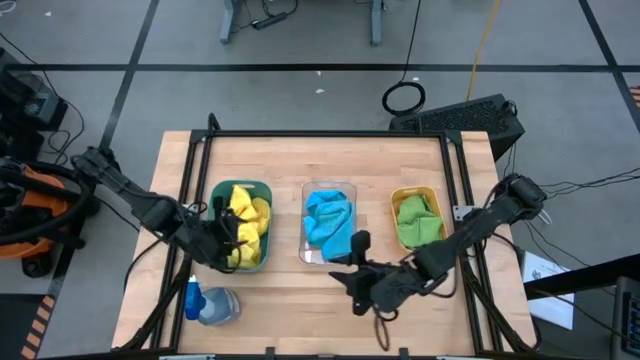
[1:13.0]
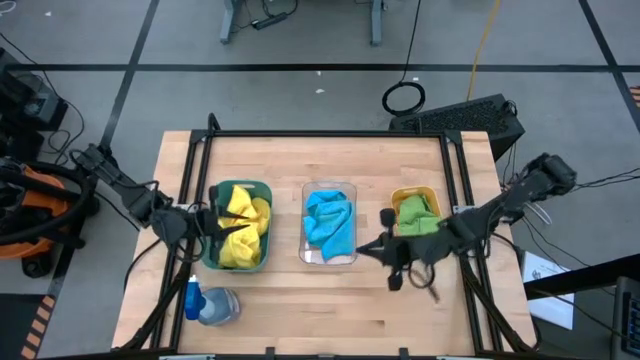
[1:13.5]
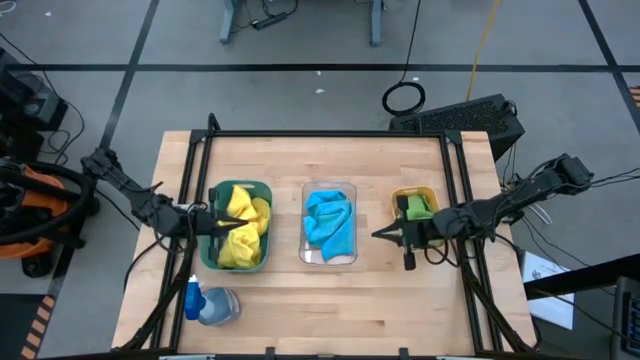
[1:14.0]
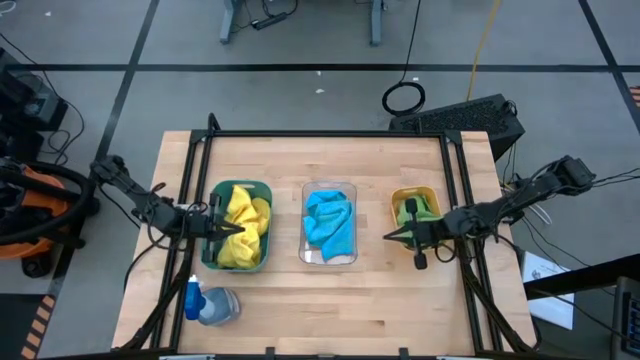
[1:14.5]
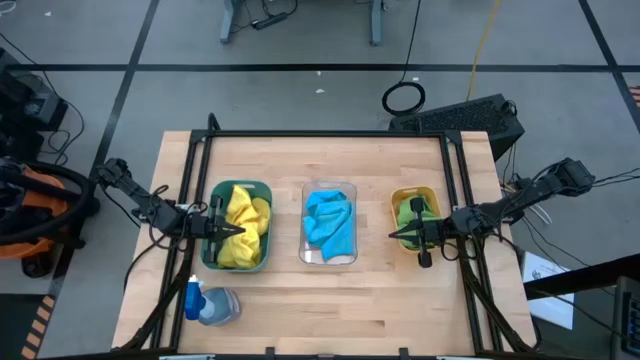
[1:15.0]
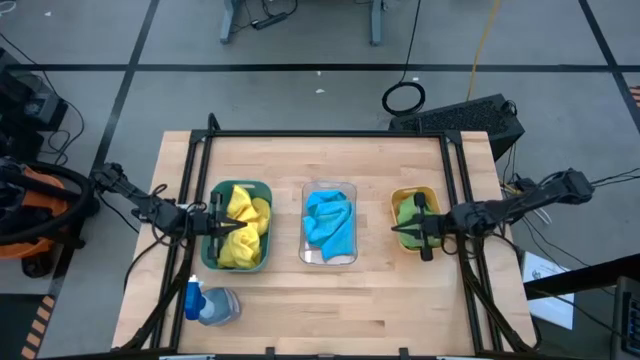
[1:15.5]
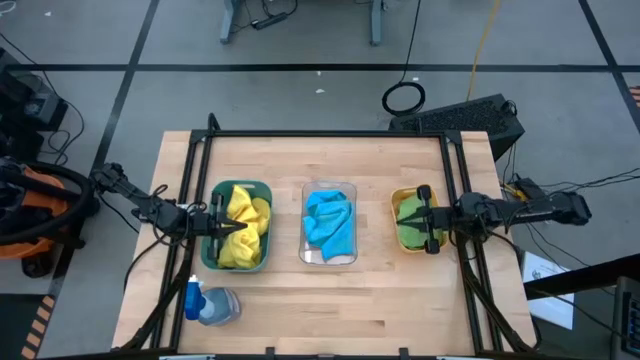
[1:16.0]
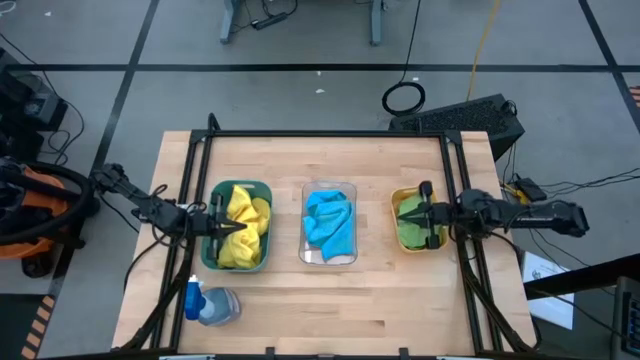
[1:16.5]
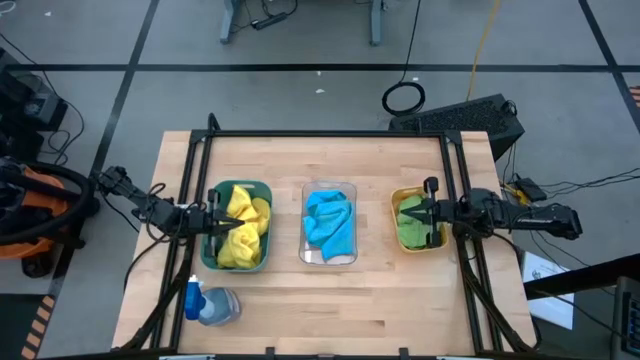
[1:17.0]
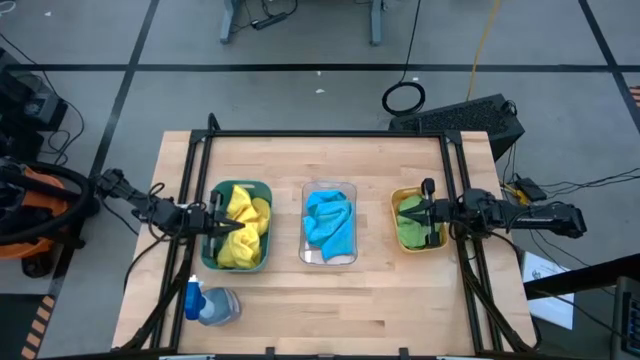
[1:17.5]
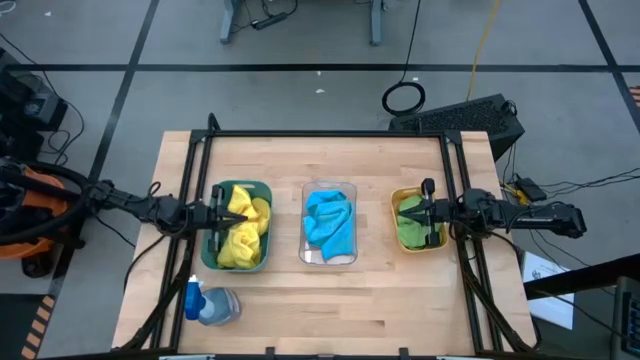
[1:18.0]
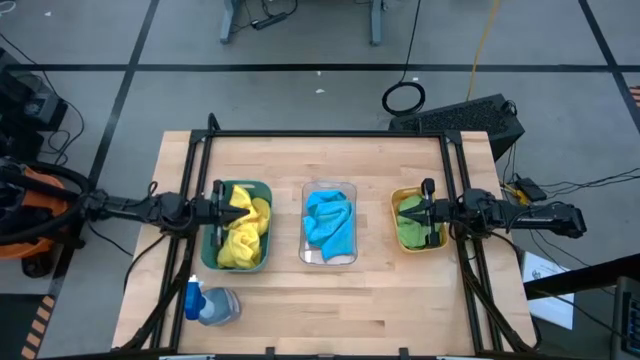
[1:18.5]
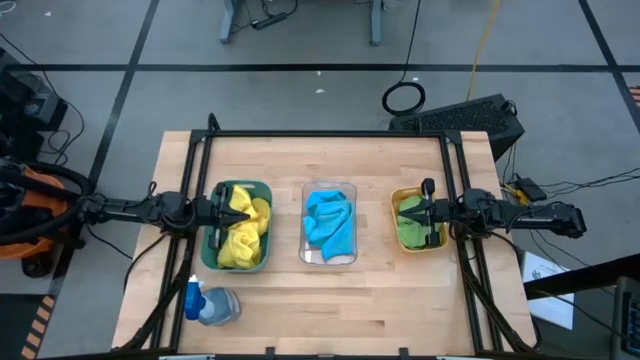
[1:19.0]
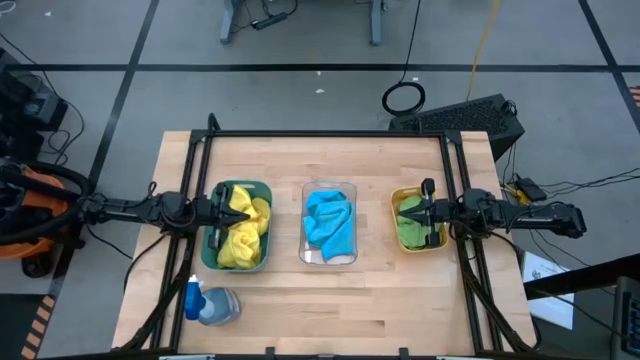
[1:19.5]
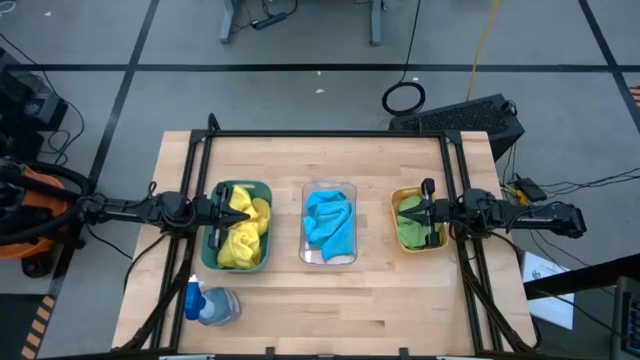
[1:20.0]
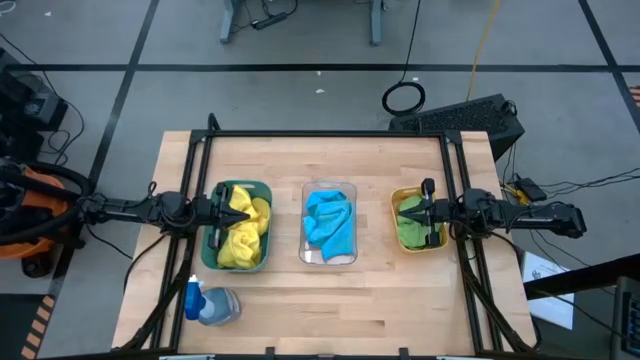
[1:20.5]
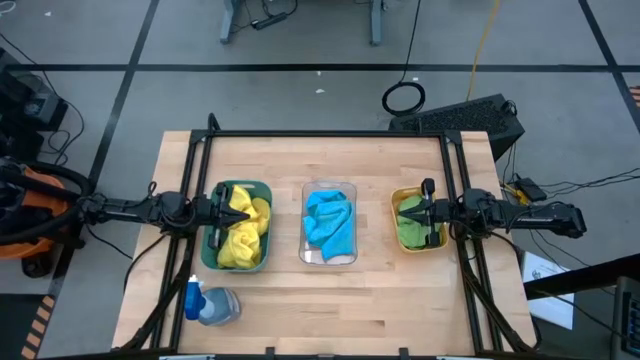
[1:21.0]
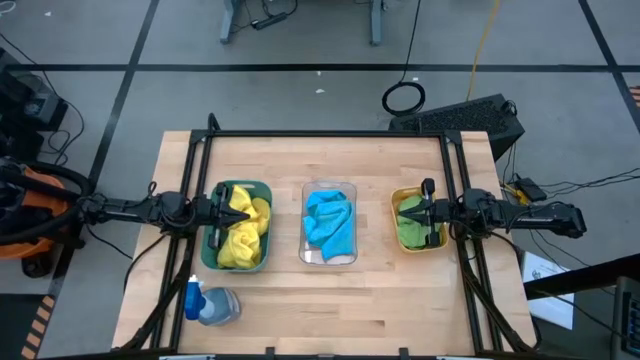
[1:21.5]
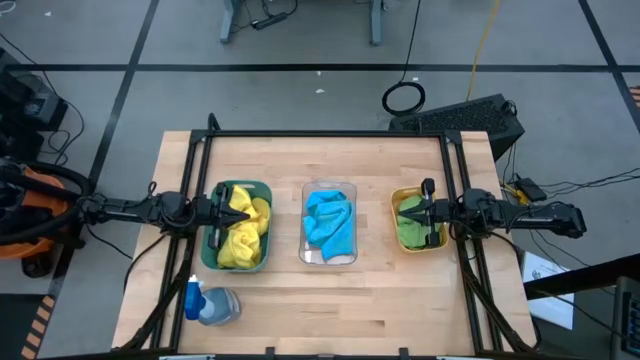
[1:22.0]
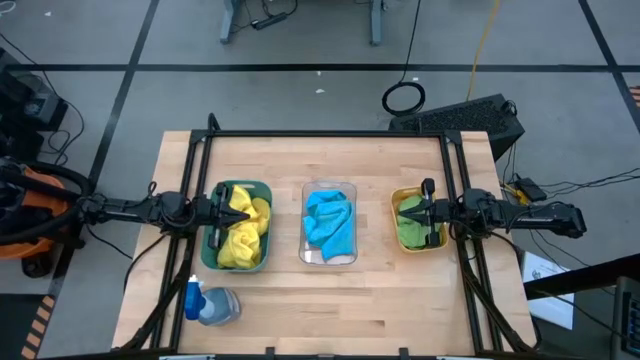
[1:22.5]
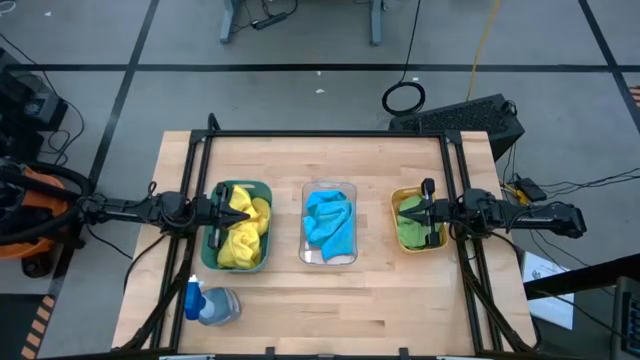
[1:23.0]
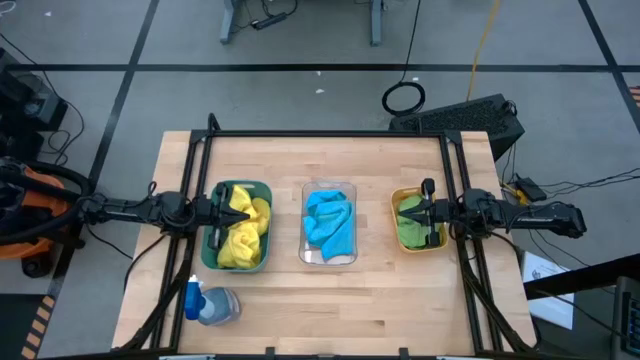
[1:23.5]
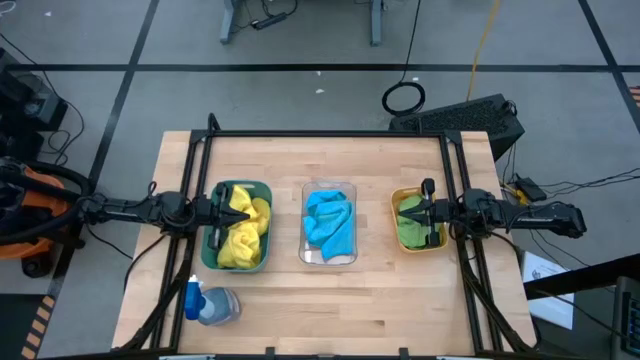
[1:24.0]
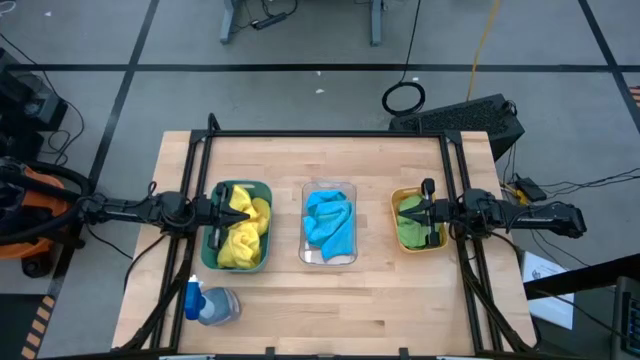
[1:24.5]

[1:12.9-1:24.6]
Task: Sort microfiber towel by color & place in baskets
Return to Home Position

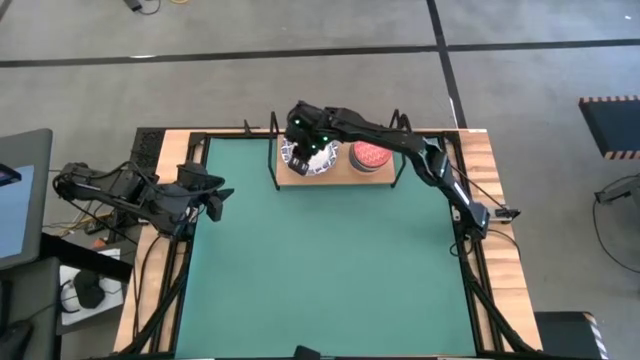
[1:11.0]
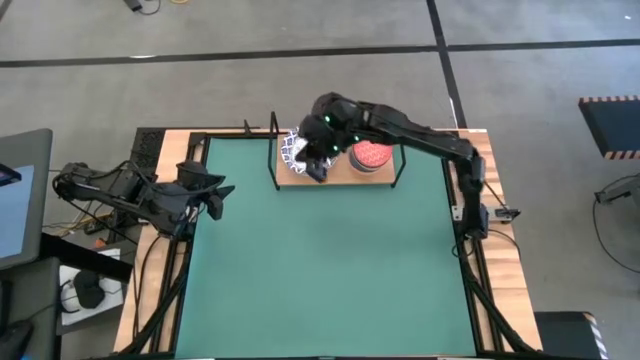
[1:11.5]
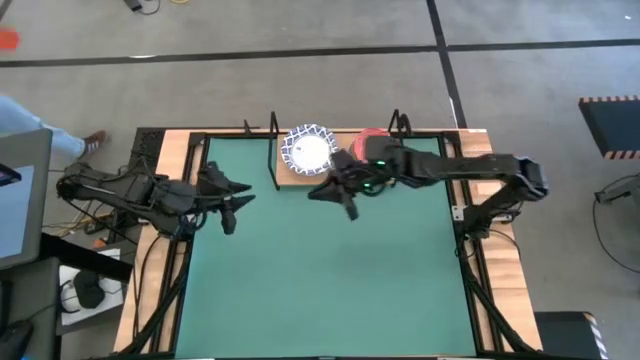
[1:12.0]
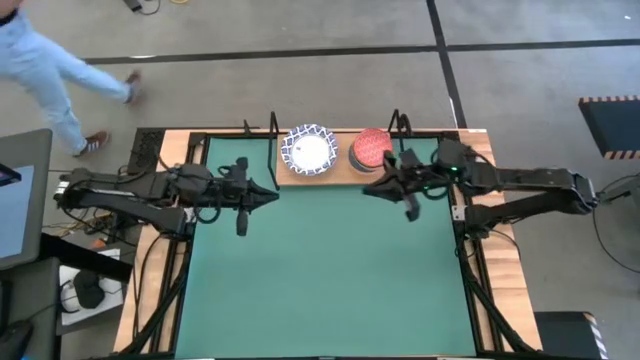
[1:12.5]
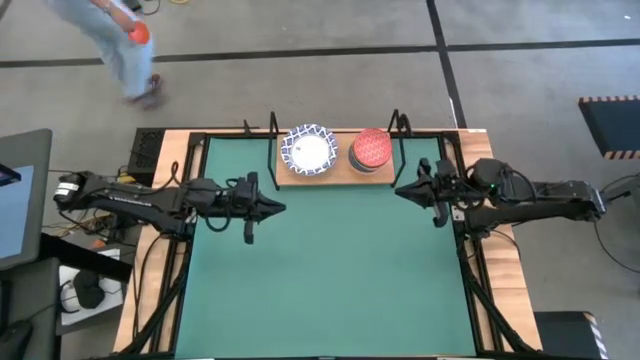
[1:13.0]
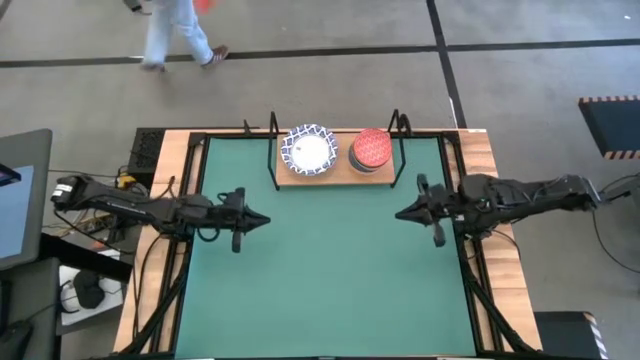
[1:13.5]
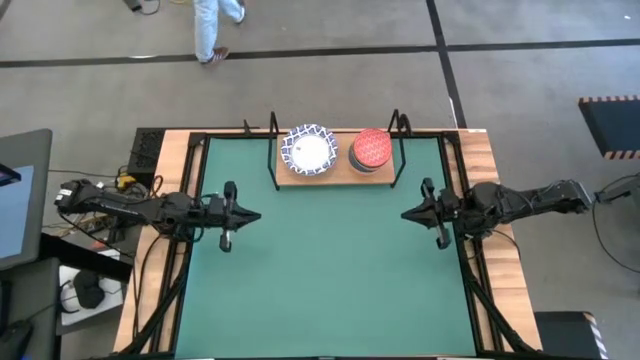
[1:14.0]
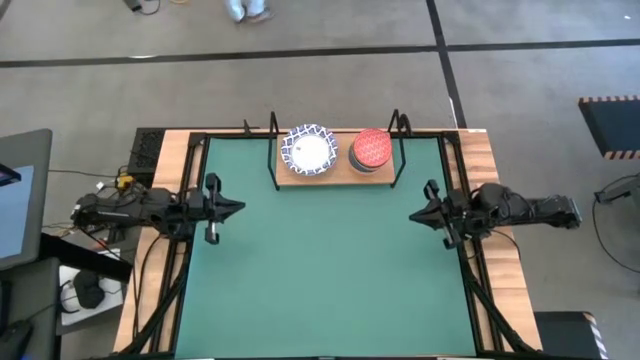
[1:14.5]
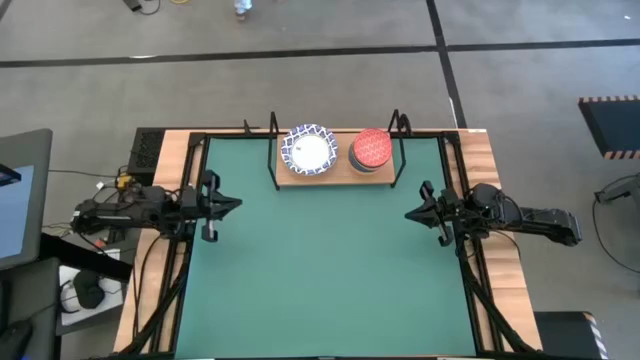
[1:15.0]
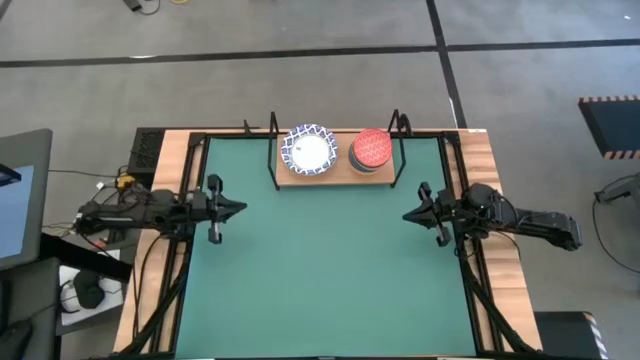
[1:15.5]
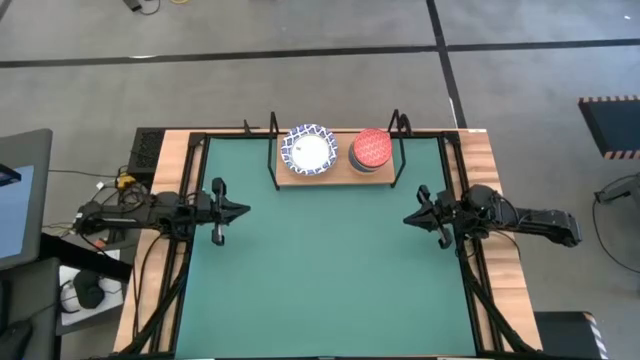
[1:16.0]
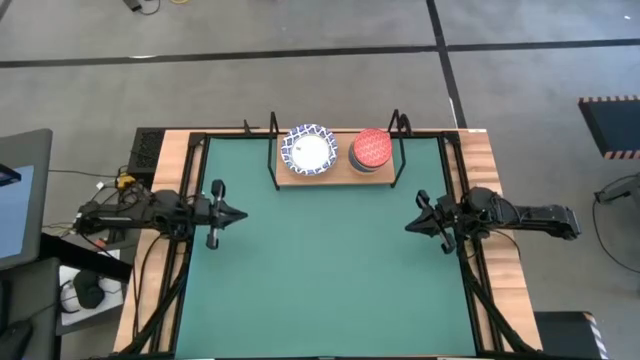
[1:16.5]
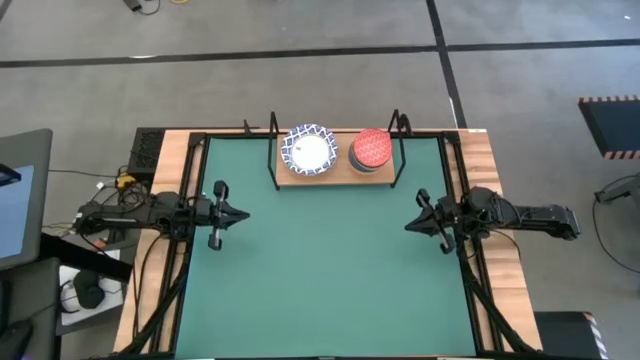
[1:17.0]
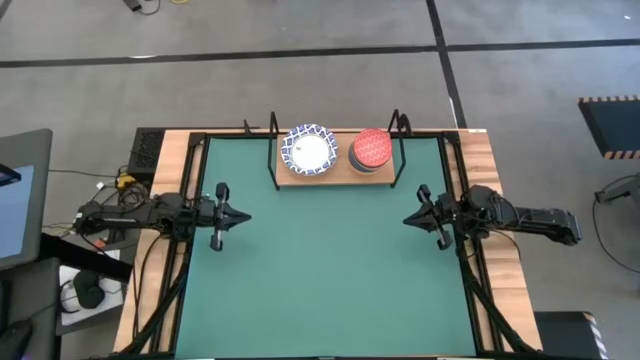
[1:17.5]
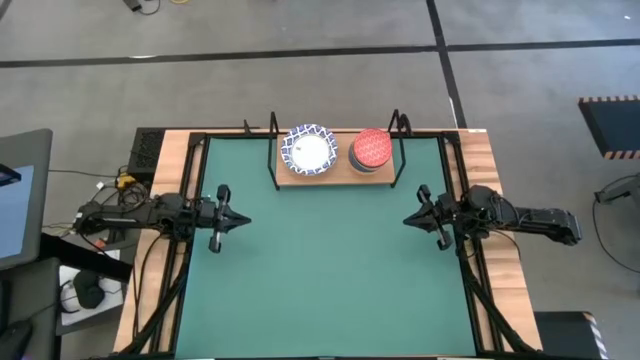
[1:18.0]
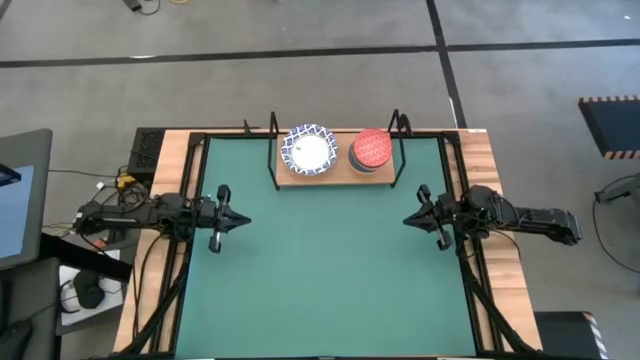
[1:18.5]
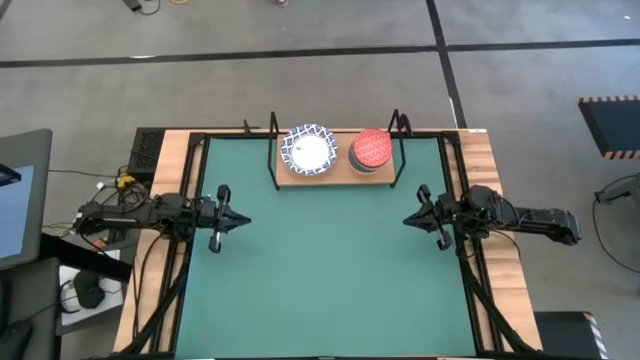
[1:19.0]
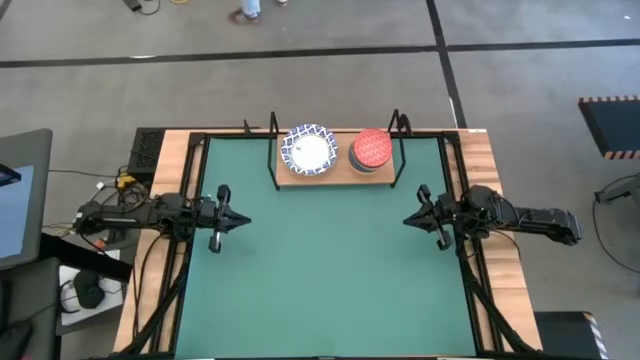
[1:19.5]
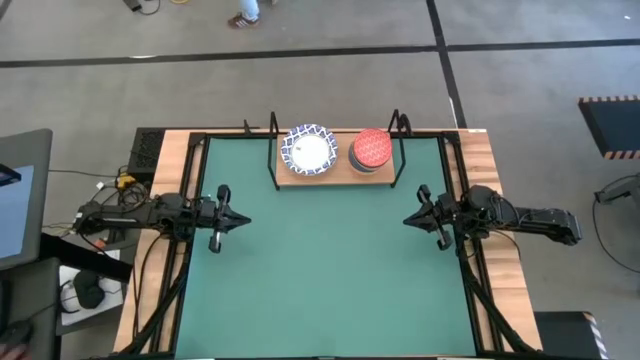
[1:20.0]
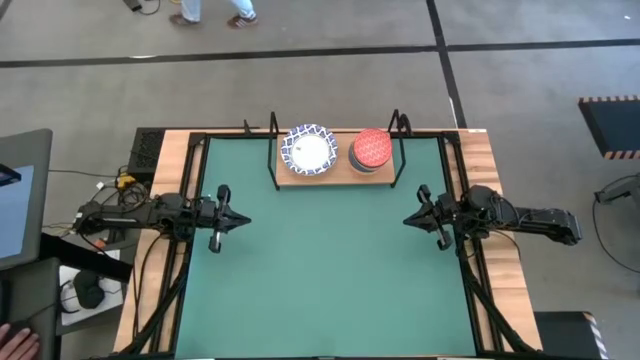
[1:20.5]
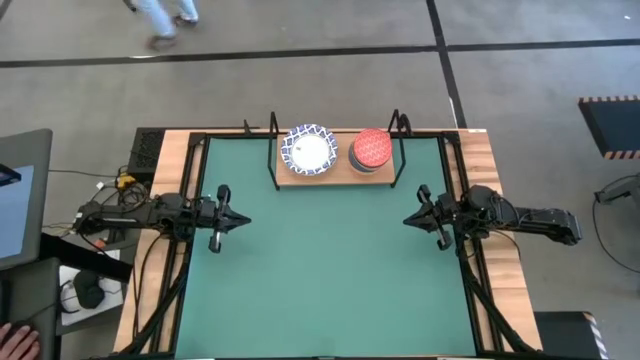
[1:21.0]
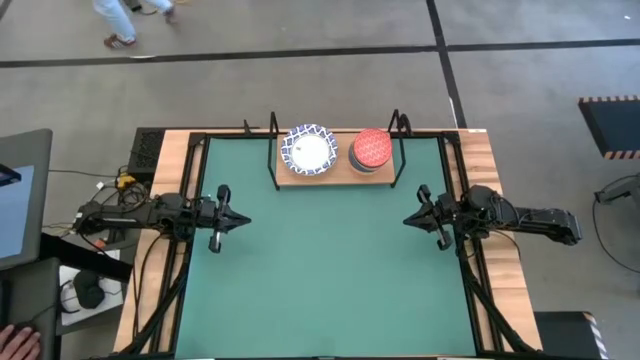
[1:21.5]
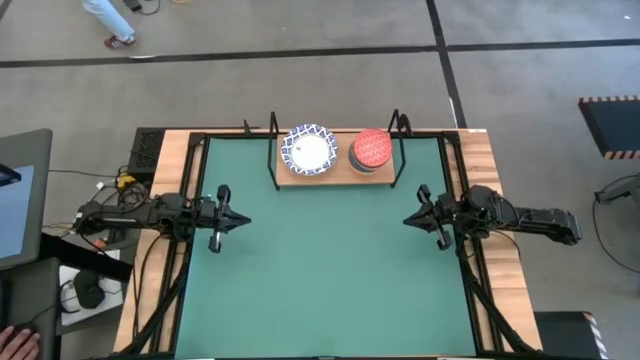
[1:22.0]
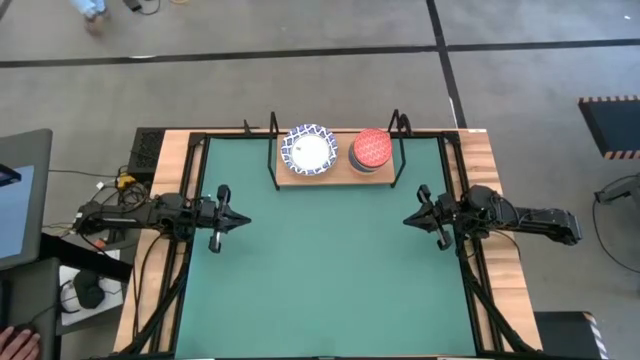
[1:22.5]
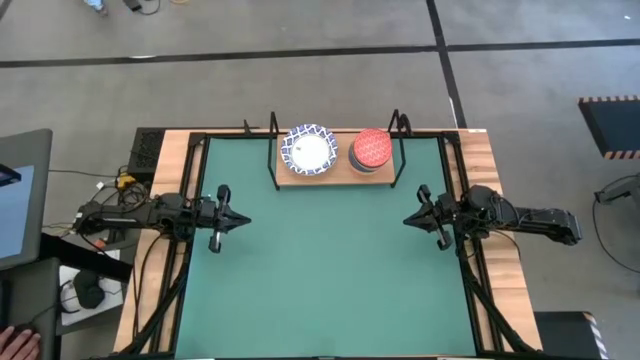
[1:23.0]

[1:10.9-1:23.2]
Task: Place and stack bowls onto a shelf
Return to Home Position
